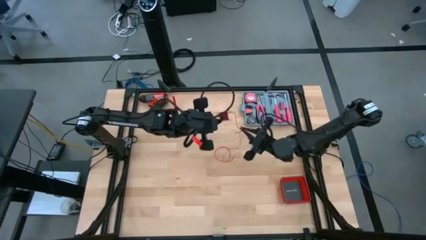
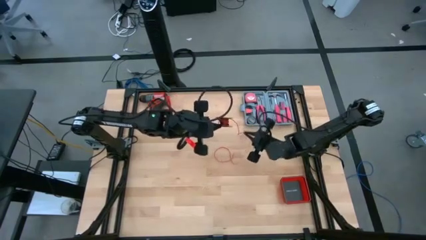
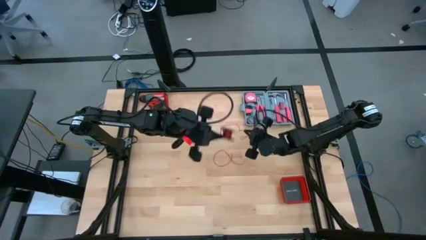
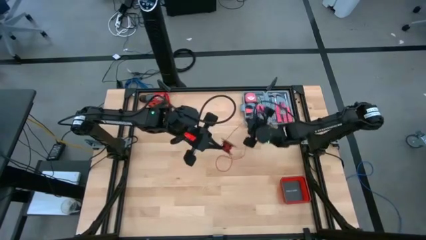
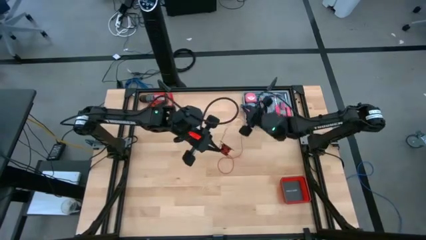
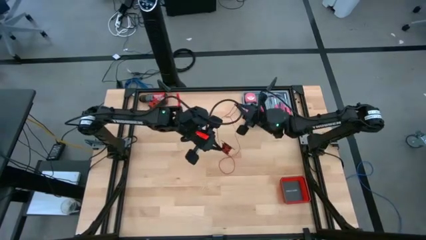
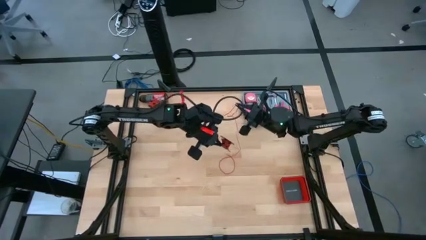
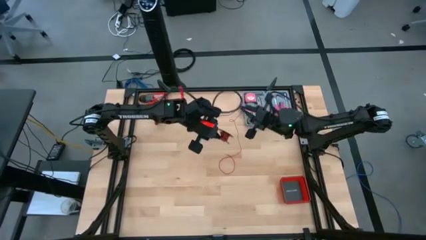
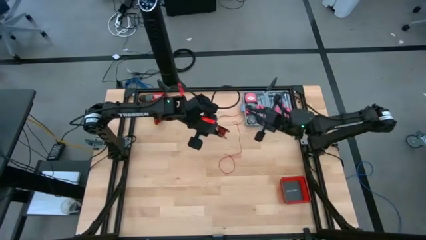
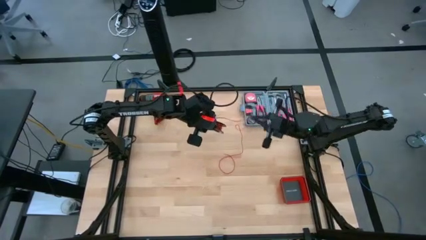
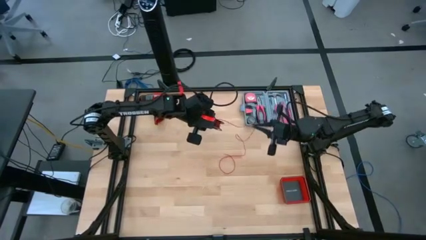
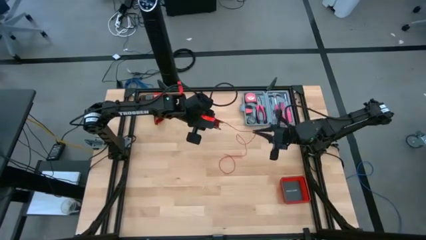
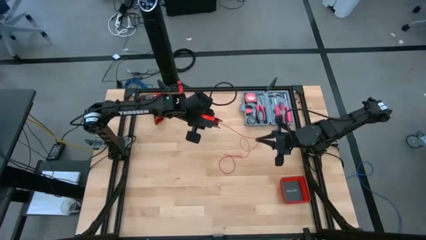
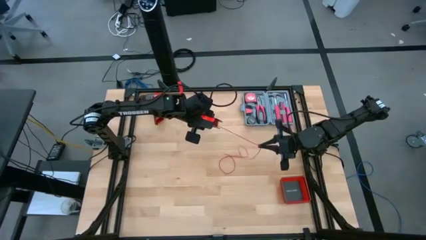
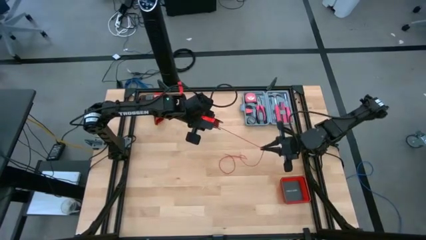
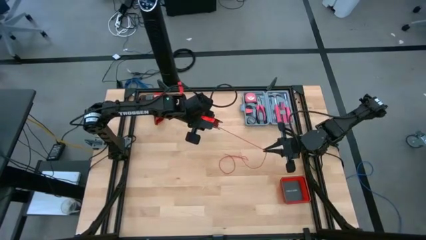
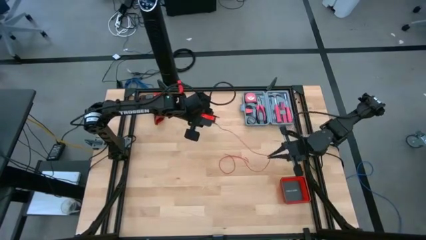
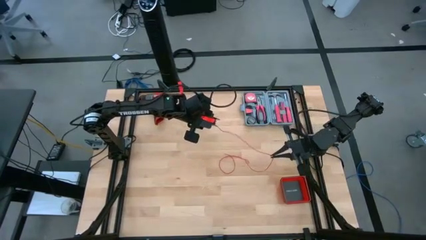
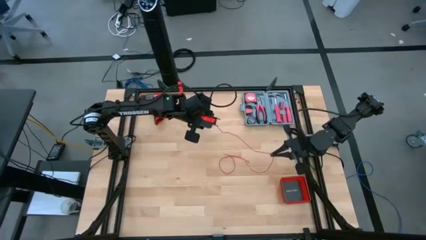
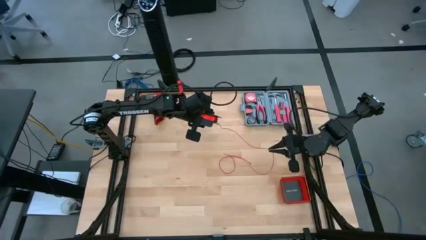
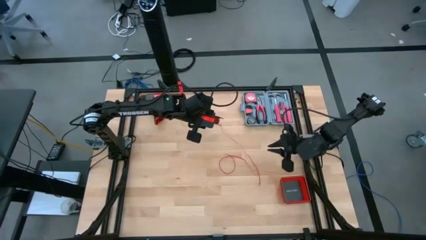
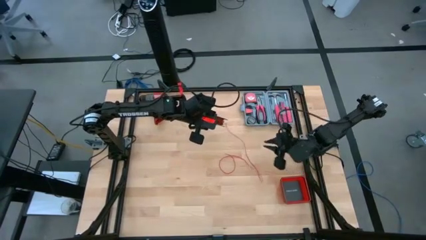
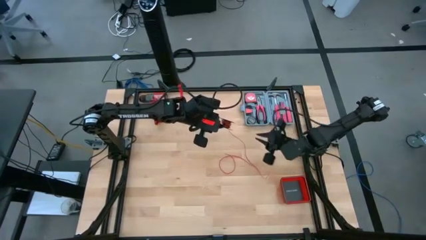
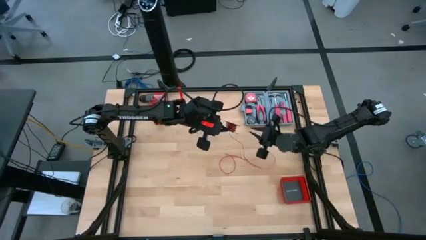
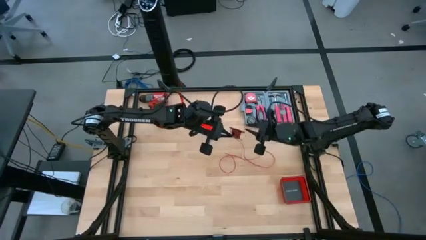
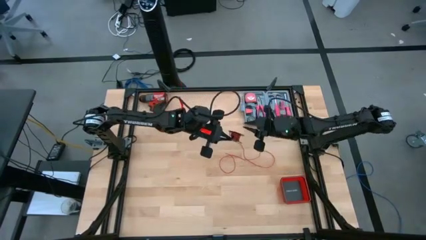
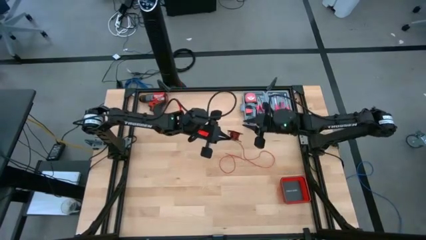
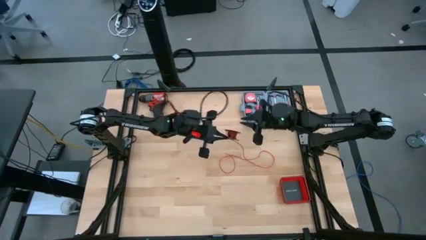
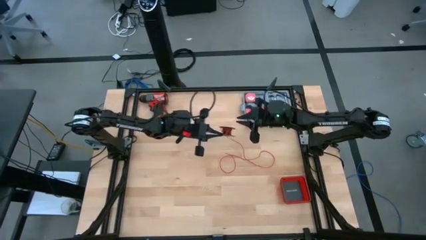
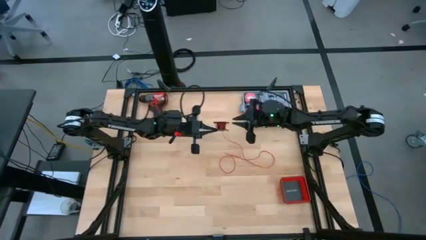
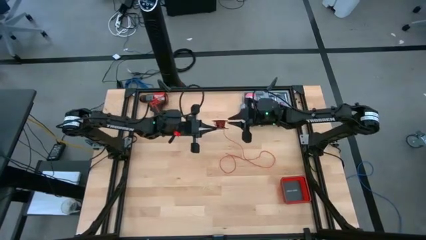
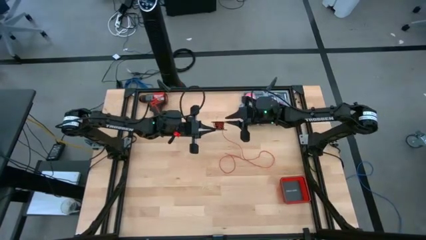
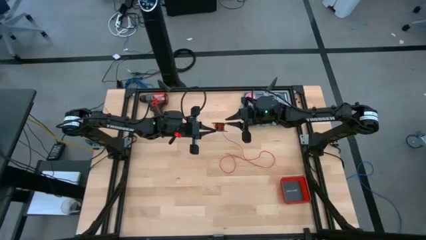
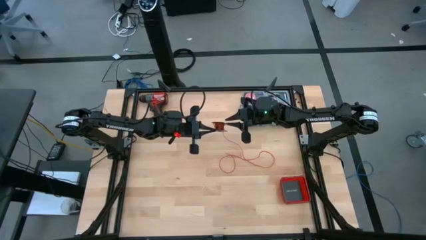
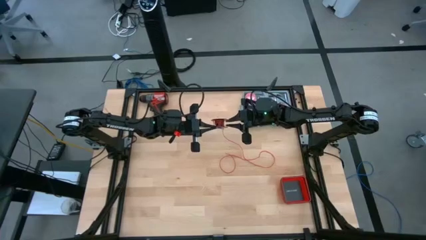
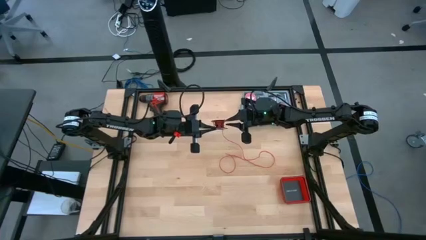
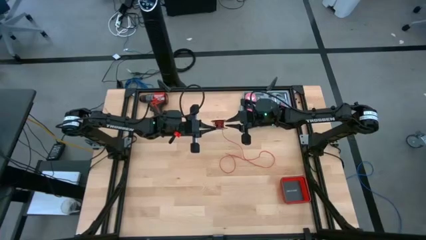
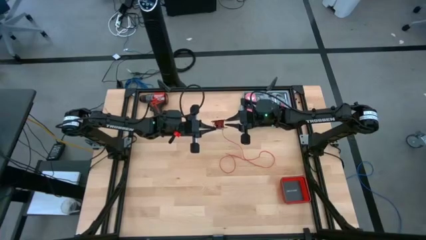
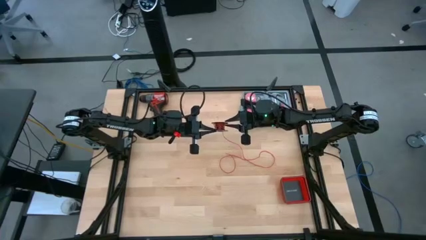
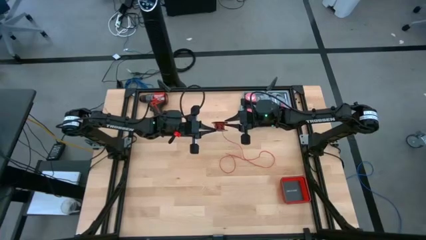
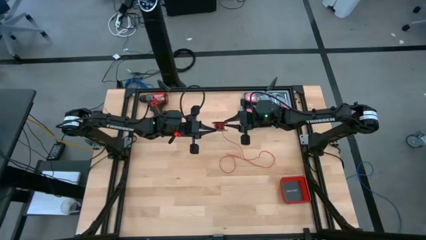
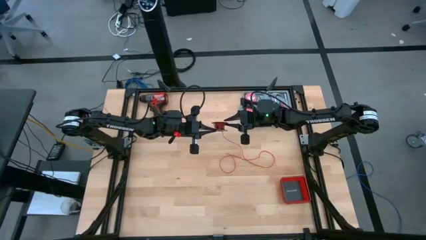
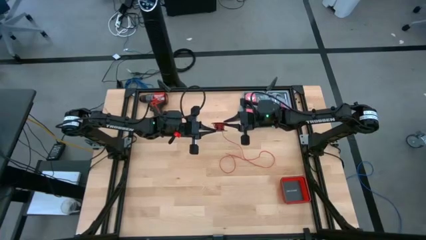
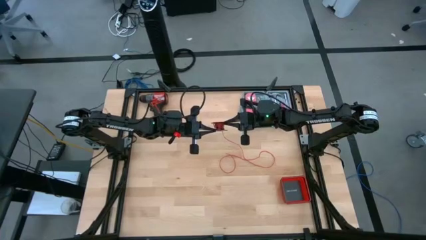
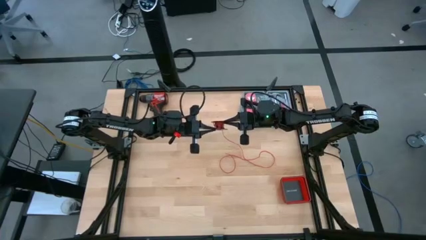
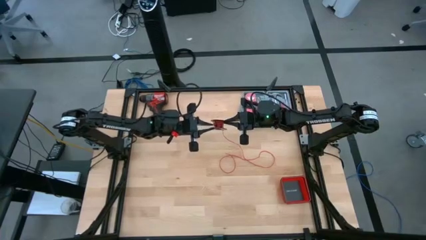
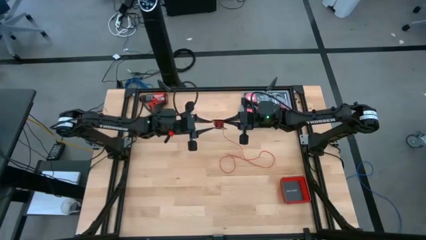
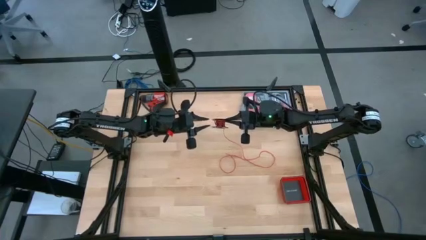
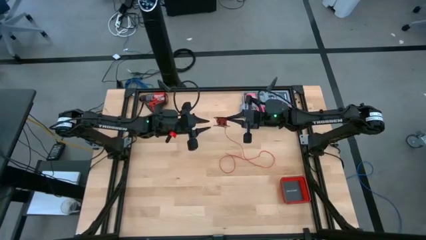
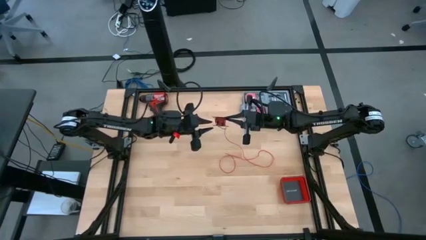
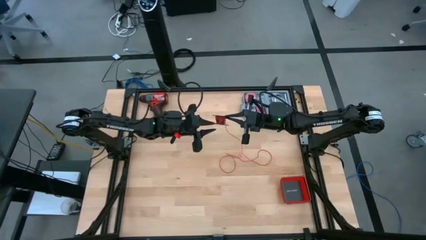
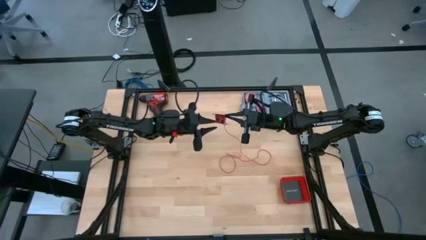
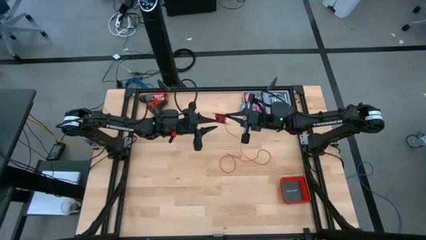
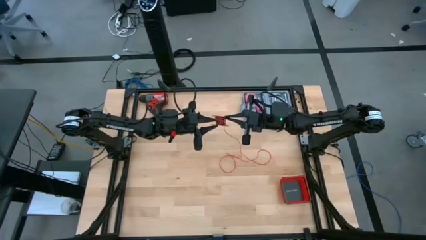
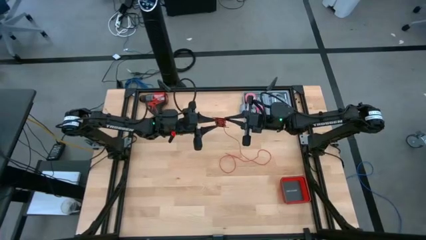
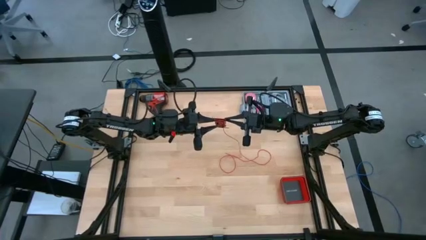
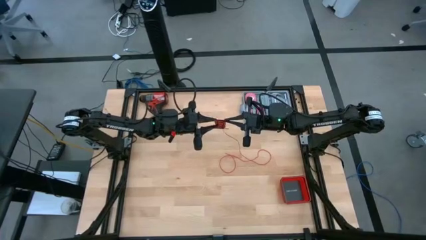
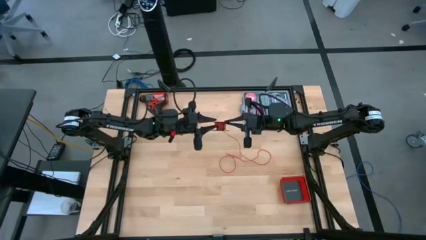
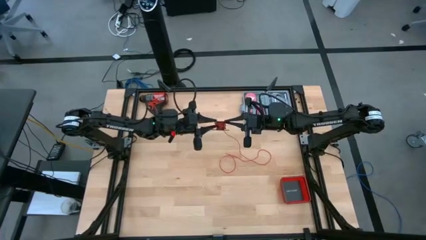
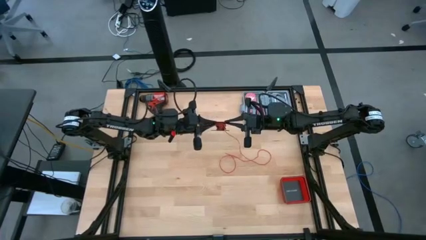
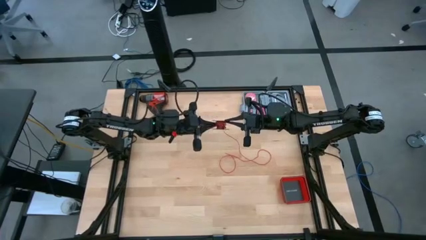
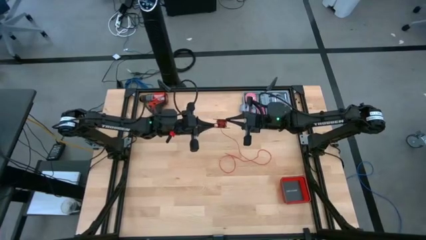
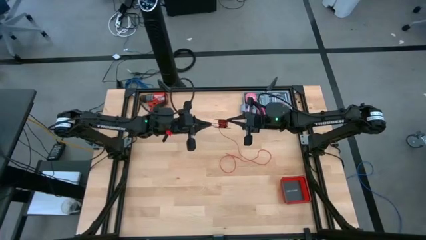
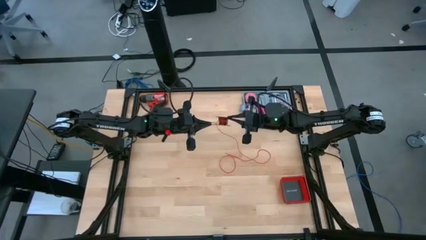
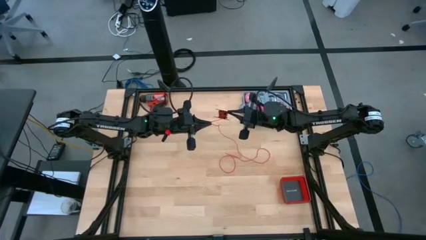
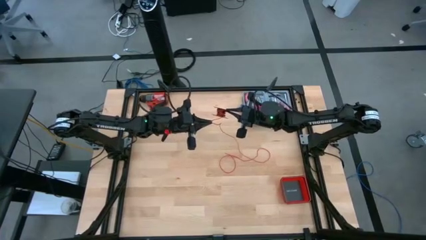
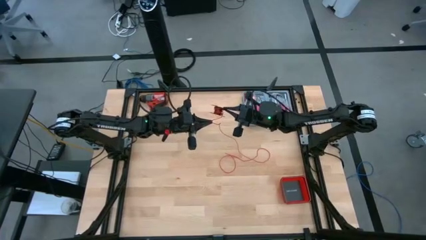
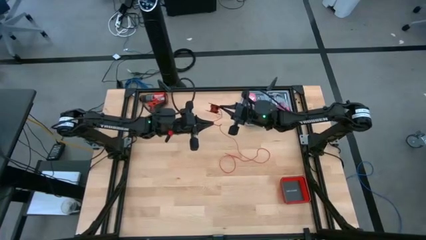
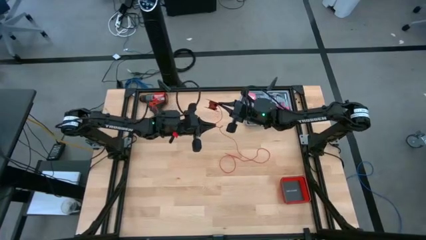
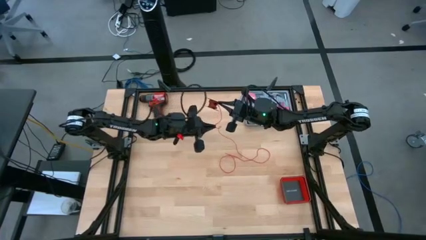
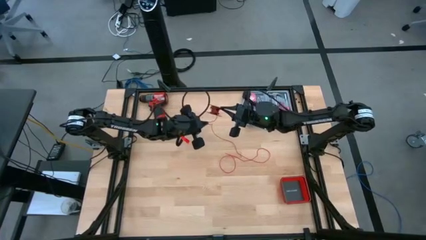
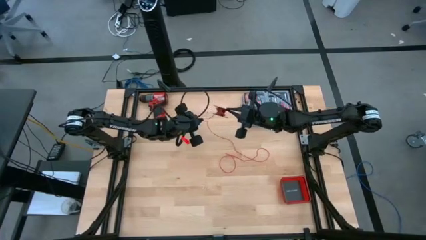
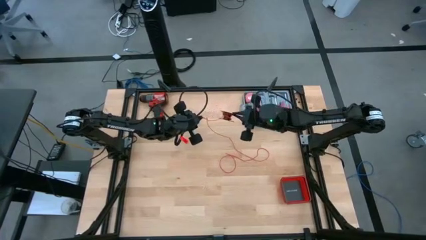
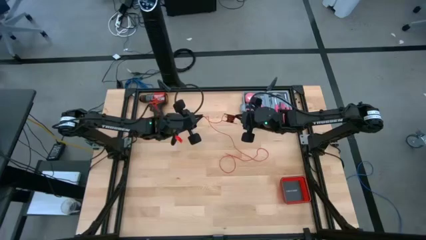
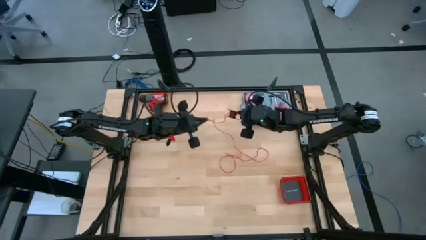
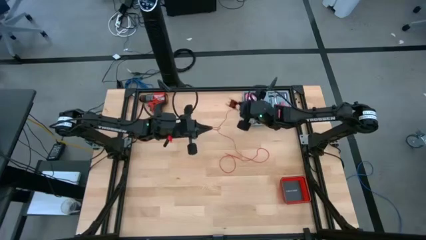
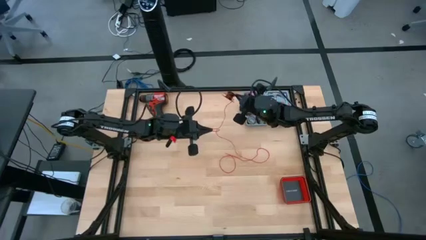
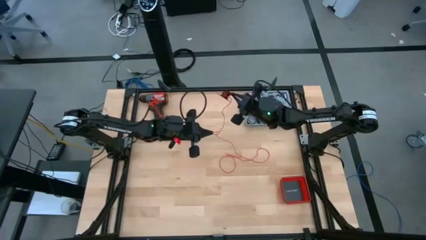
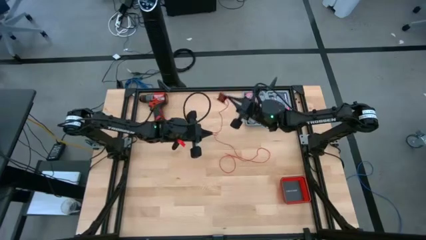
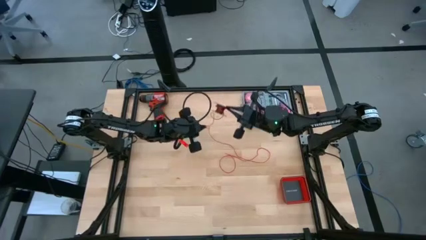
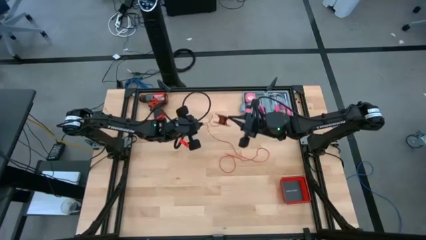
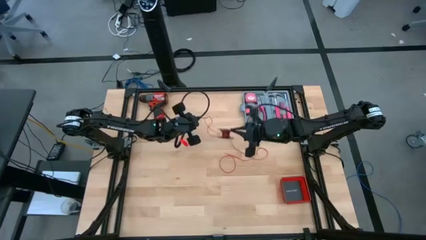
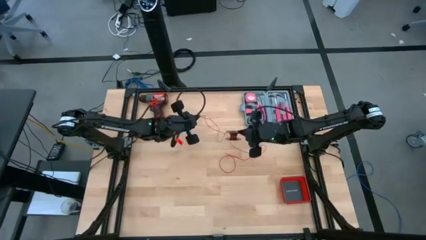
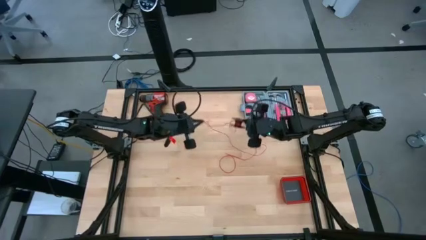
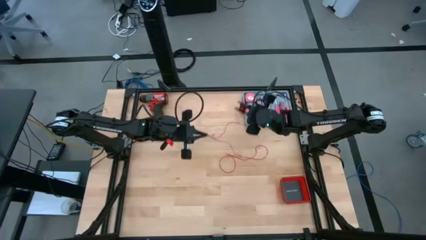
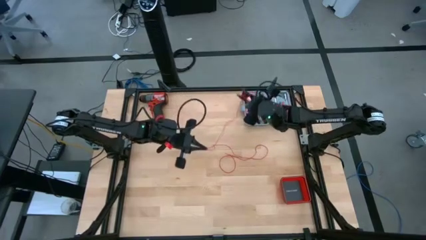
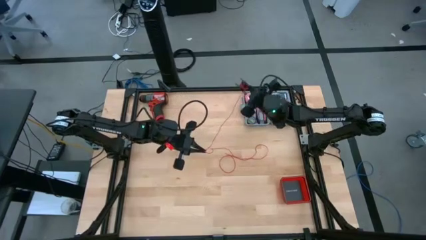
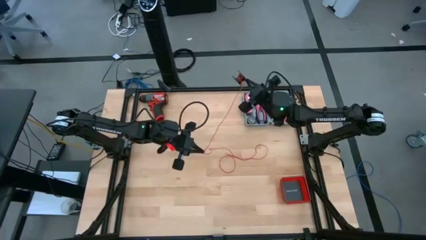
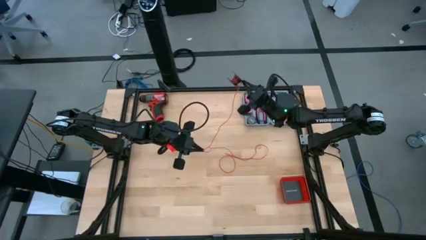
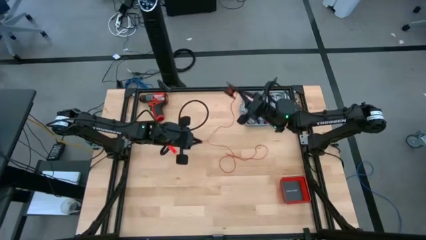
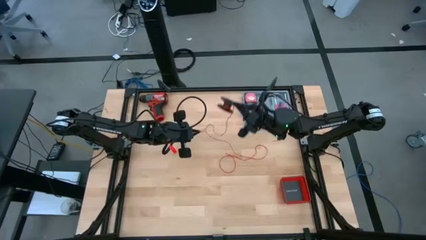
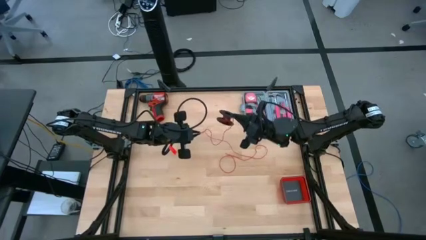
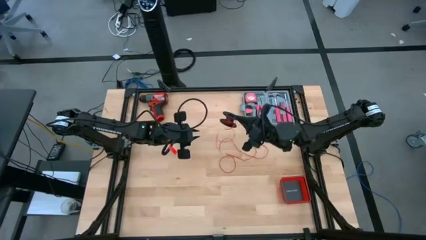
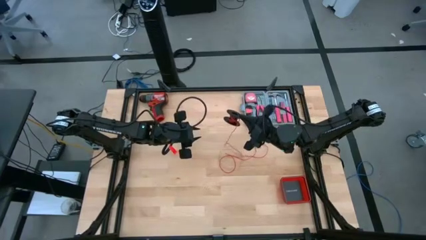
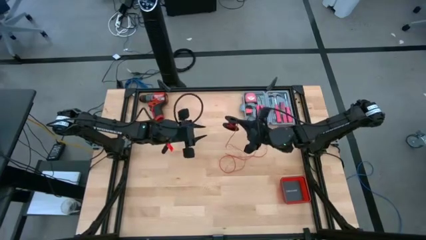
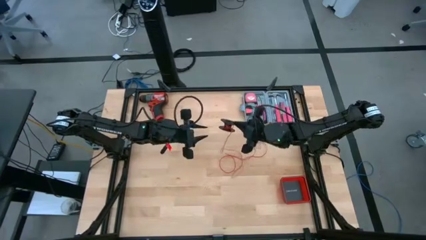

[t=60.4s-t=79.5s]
Task: Coil cords
Uncoil the red wire from the black spool
